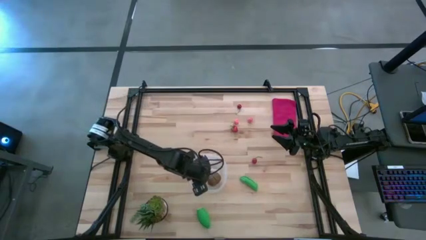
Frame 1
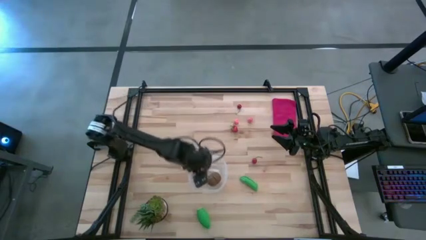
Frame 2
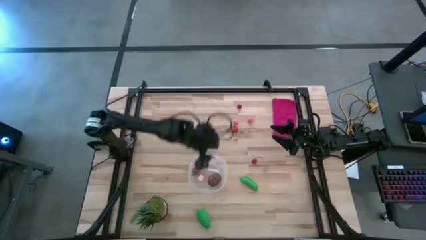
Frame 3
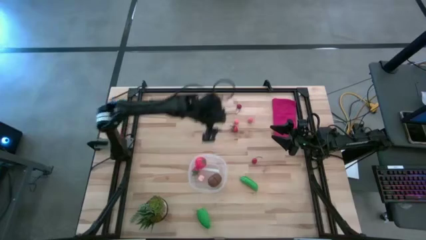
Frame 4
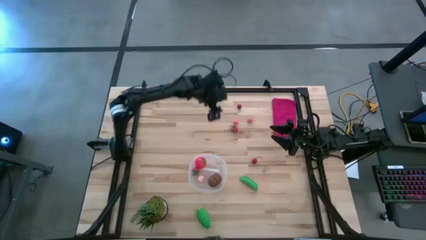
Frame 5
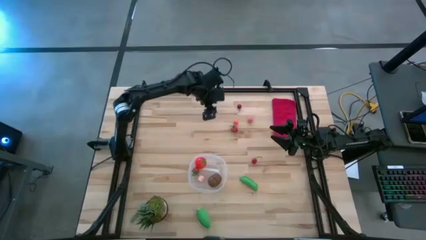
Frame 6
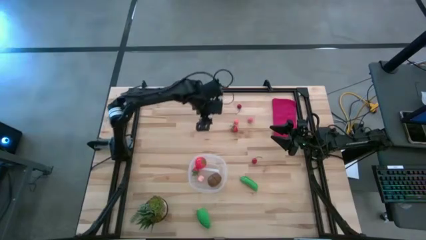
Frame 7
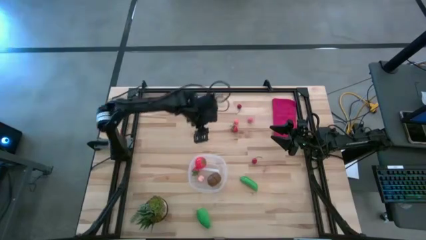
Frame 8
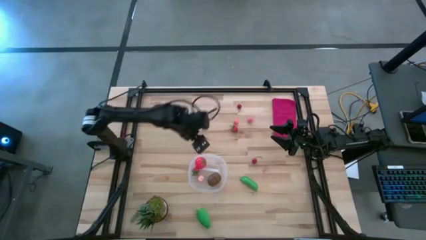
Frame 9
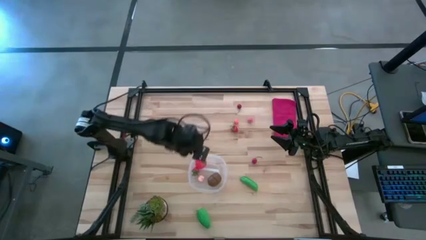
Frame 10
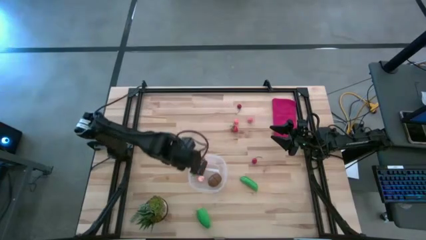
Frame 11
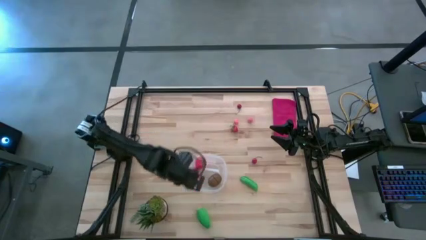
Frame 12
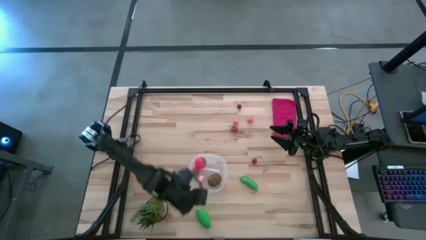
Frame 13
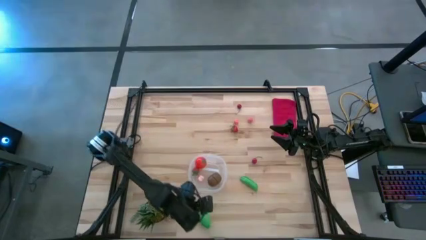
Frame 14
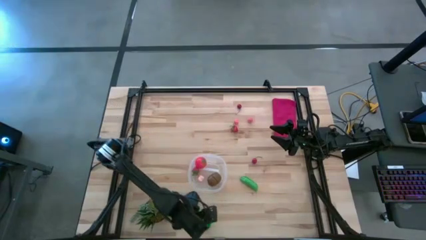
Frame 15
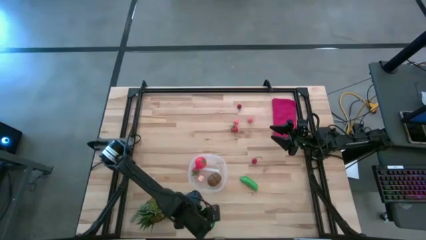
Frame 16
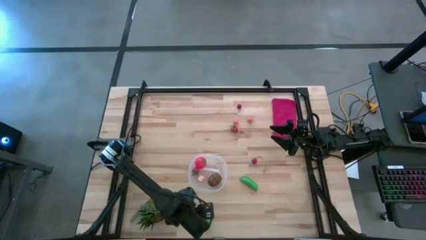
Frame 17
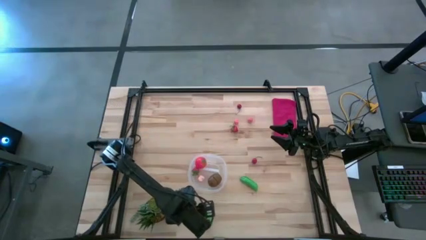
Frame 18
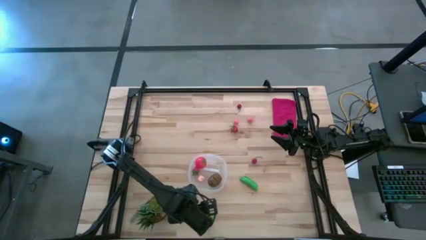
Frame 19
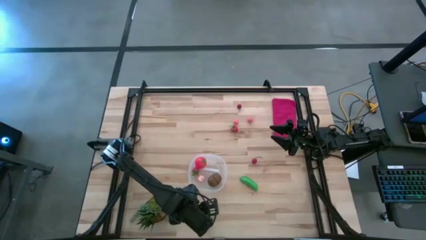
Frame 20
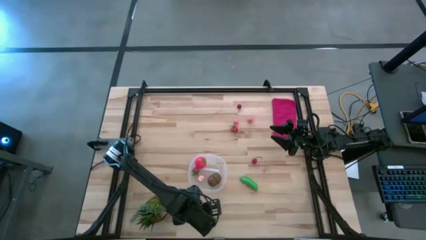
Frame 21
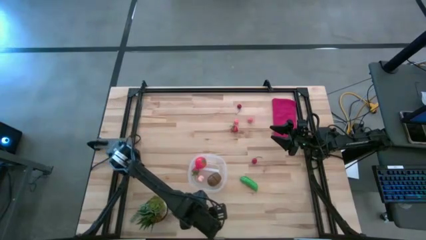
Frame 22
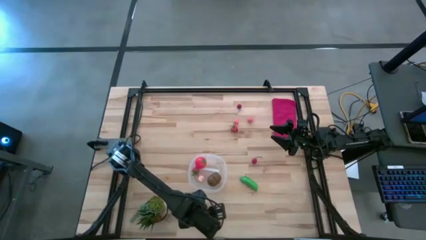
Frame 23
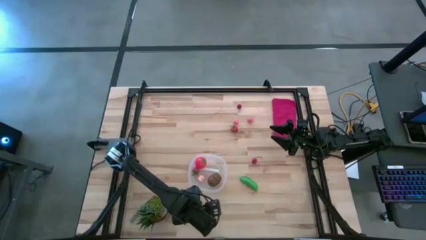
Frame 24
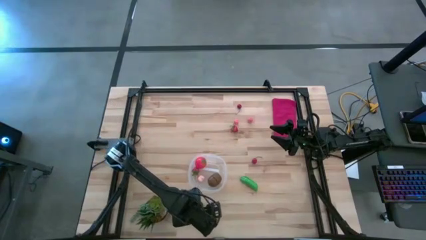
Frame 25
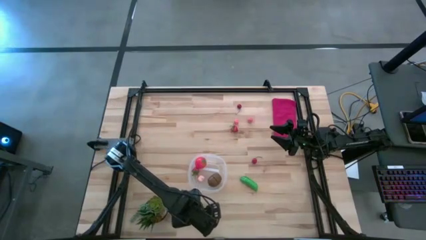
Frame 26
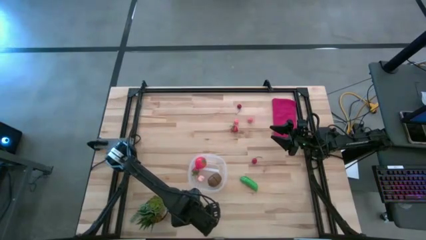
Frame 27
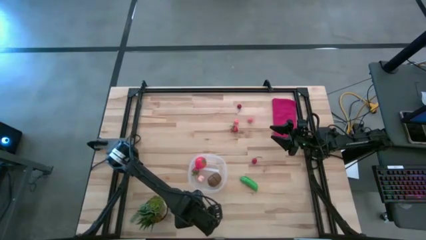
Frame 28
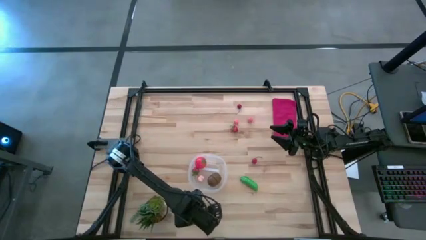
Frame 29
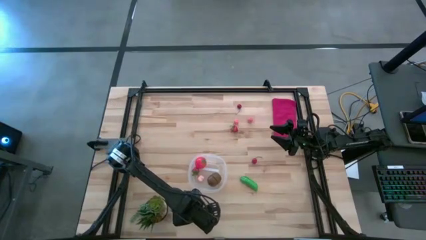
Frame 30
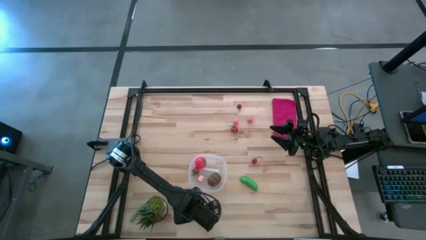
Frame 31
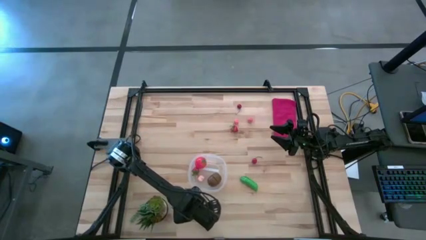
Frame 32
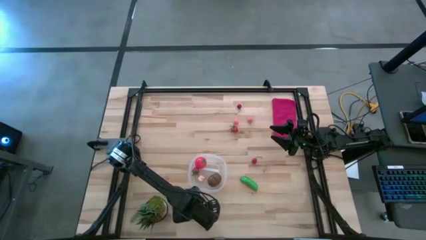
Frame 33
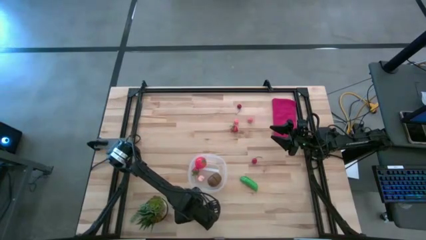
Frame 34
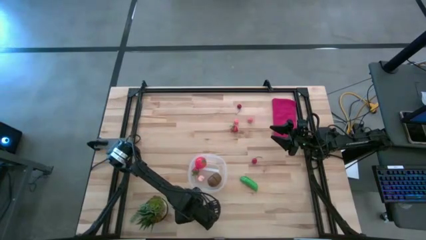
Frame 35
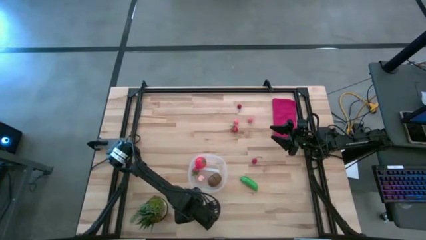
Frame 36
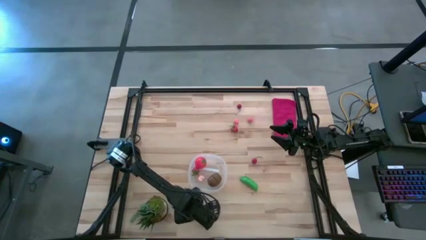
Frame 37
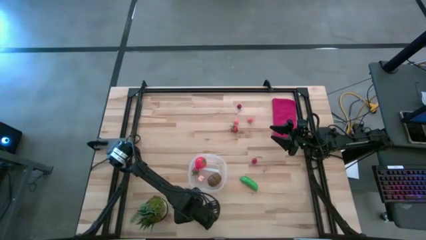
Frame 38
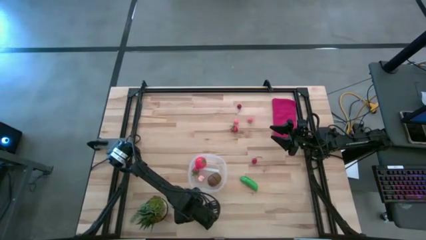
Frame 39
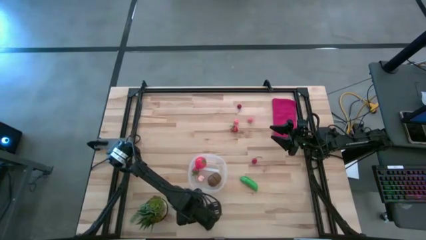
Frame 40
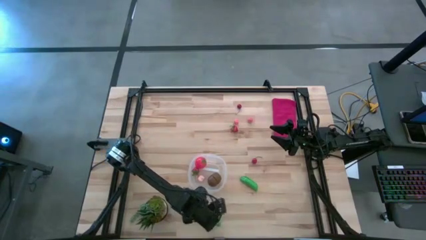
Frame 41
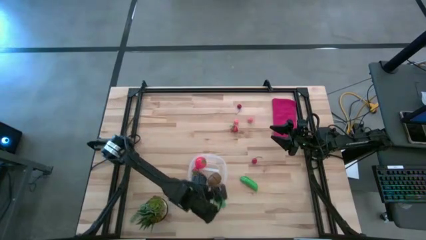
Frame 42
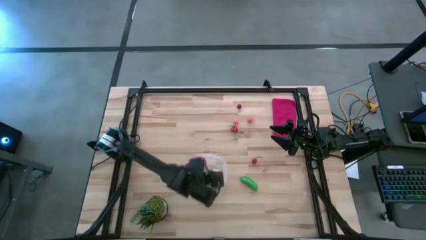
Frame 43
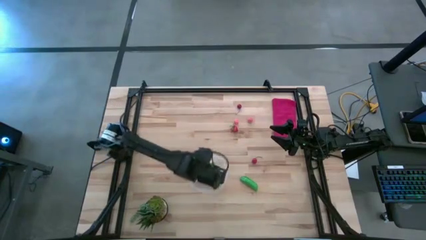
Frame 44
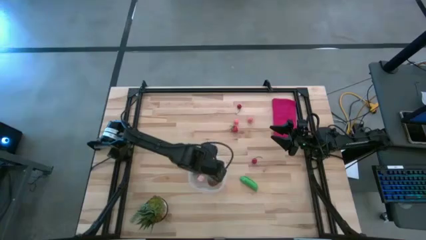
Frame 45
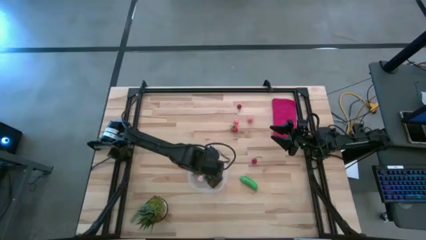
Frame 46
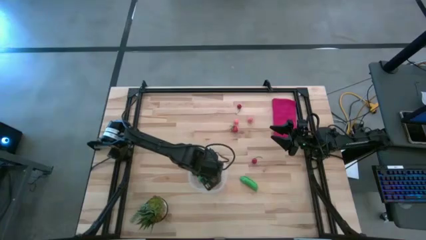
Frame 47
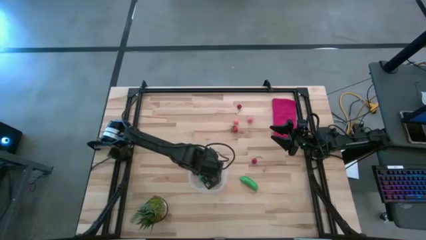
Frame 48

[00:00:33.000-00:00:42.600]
Task: Pick and placing Produce into tupperware
Put the corn into the bin

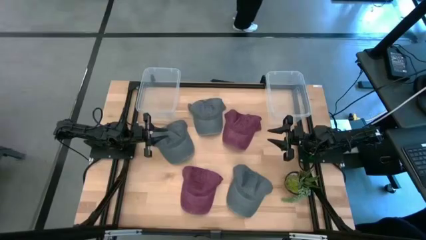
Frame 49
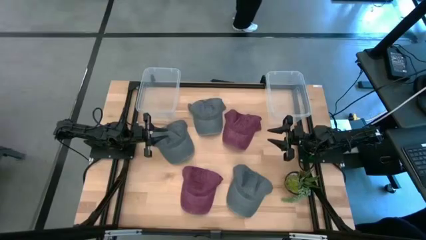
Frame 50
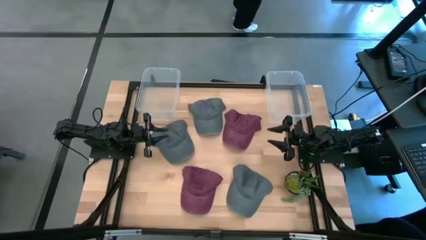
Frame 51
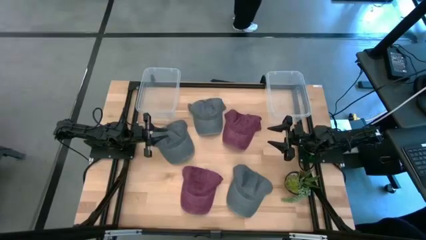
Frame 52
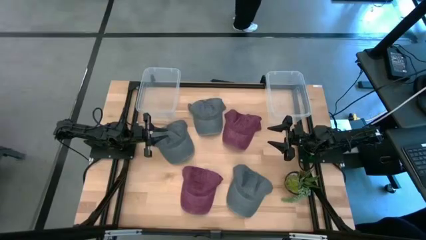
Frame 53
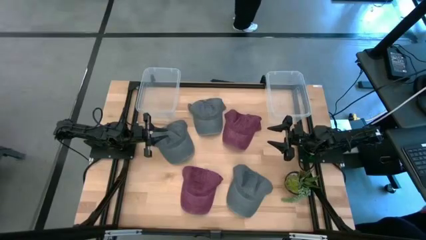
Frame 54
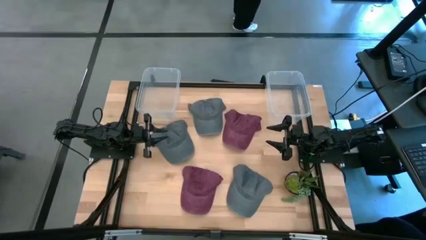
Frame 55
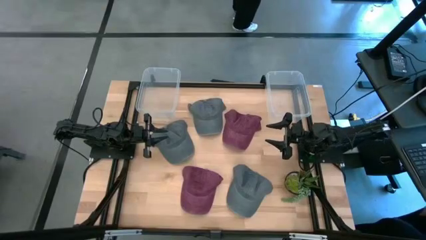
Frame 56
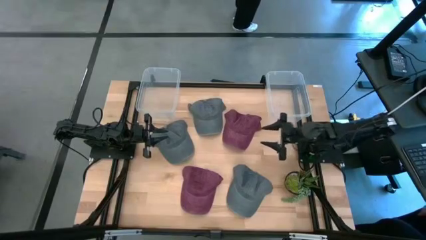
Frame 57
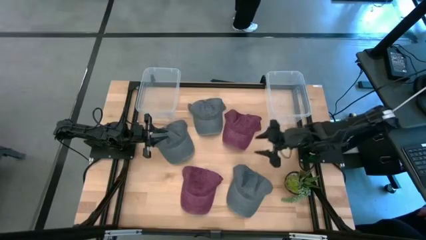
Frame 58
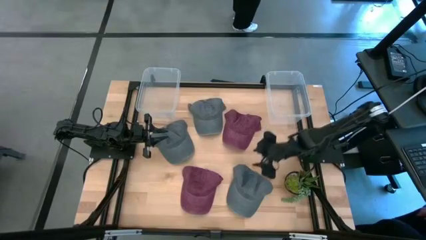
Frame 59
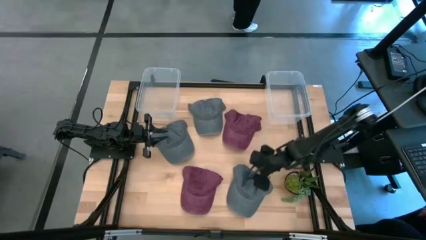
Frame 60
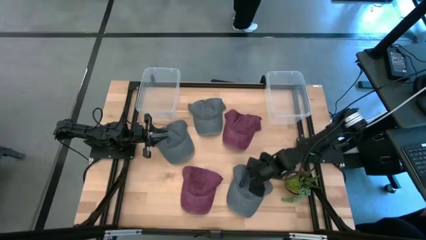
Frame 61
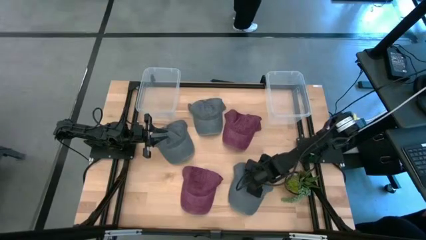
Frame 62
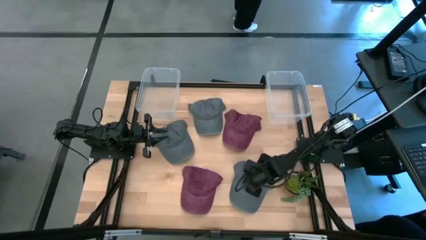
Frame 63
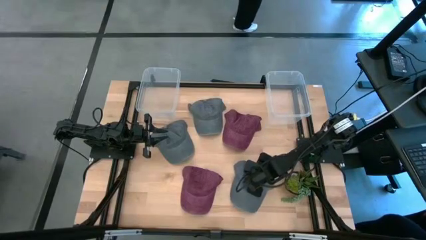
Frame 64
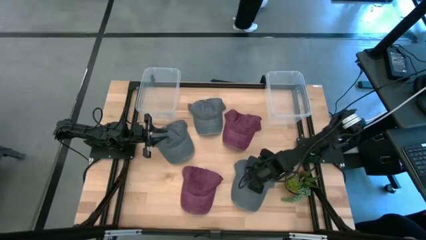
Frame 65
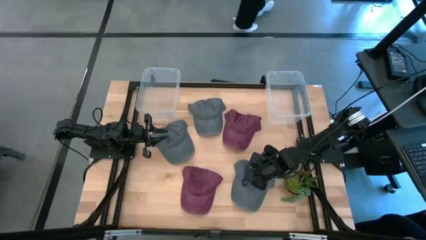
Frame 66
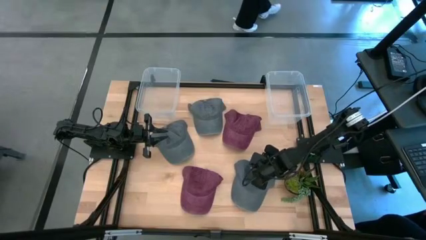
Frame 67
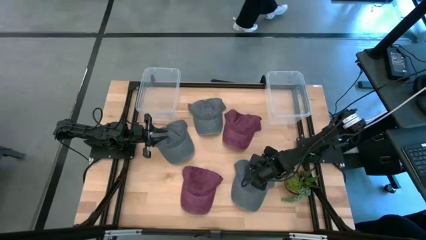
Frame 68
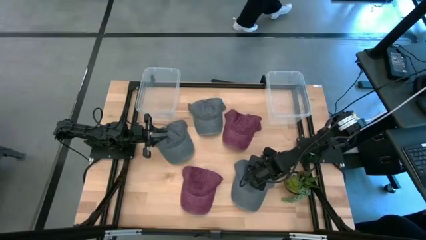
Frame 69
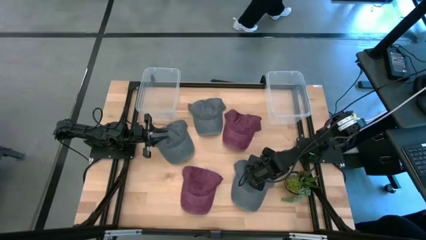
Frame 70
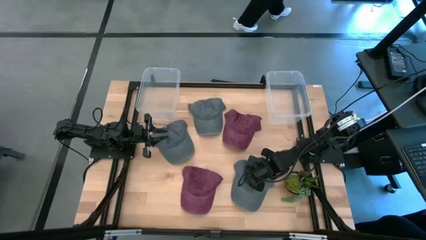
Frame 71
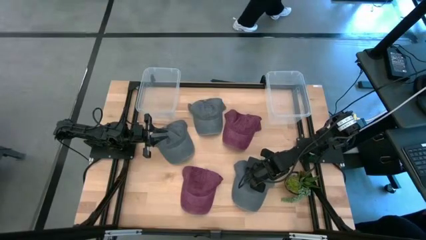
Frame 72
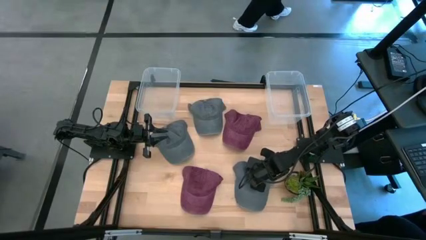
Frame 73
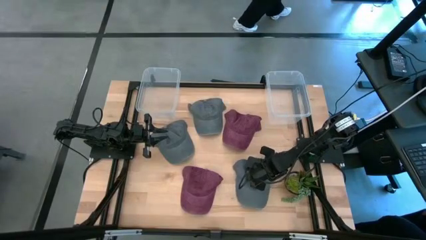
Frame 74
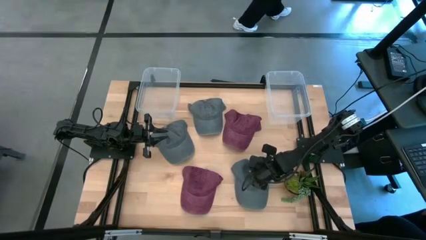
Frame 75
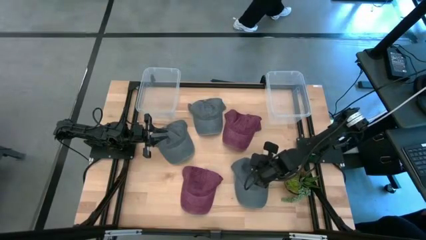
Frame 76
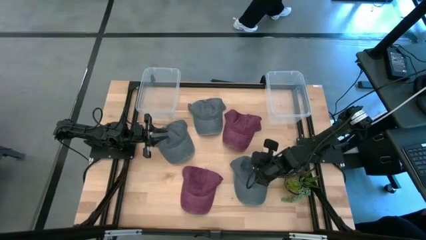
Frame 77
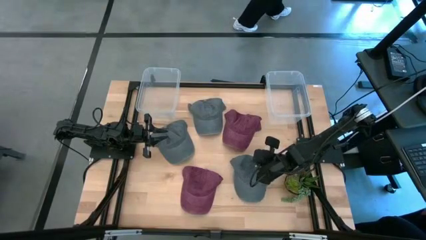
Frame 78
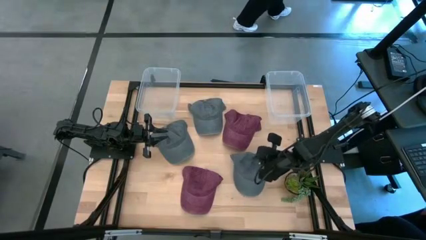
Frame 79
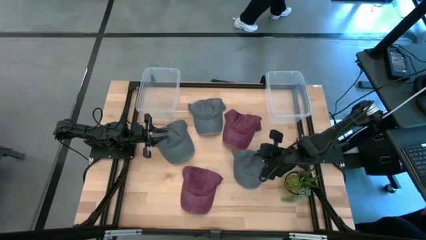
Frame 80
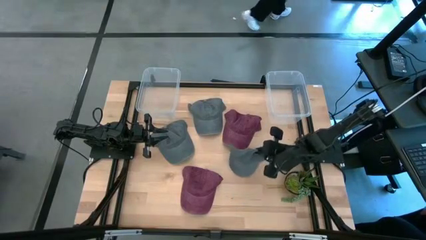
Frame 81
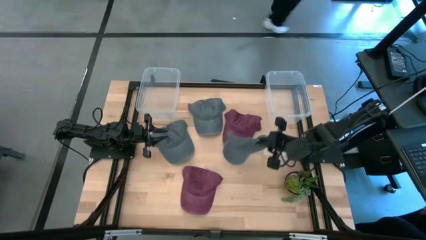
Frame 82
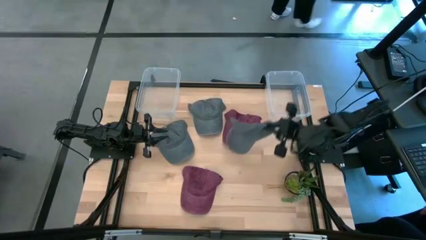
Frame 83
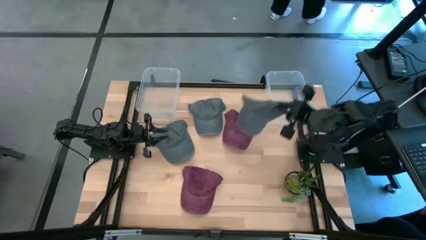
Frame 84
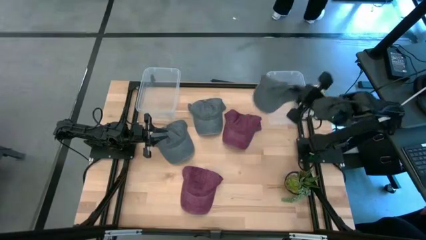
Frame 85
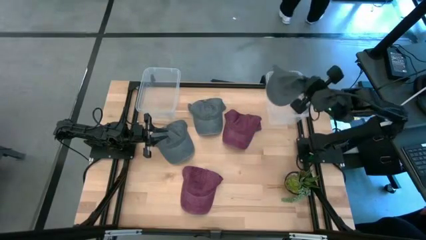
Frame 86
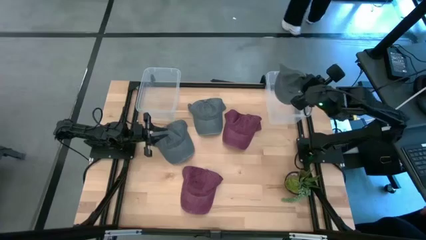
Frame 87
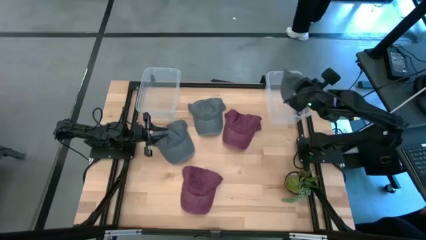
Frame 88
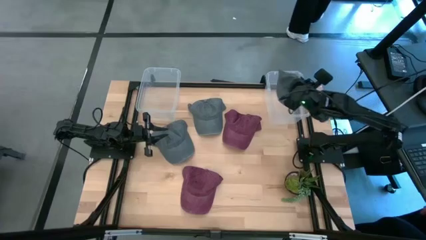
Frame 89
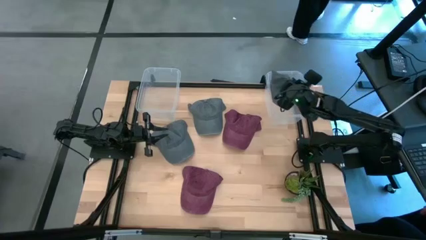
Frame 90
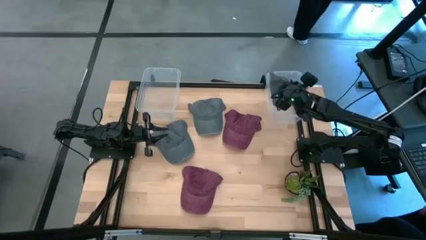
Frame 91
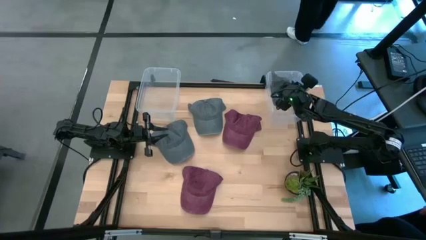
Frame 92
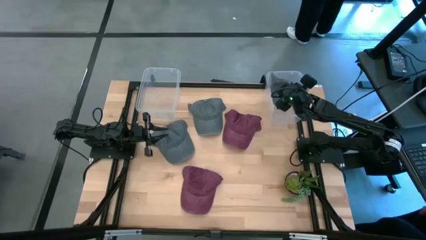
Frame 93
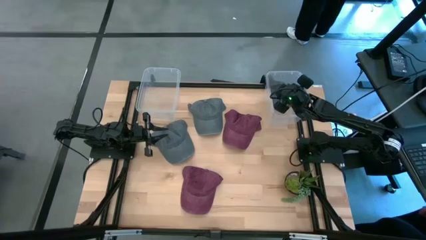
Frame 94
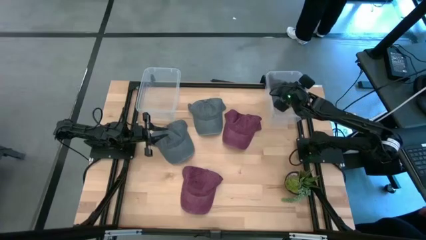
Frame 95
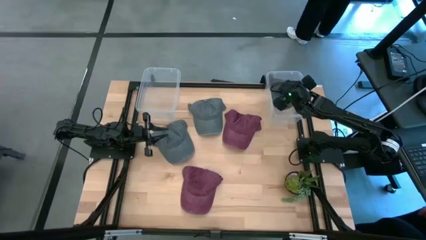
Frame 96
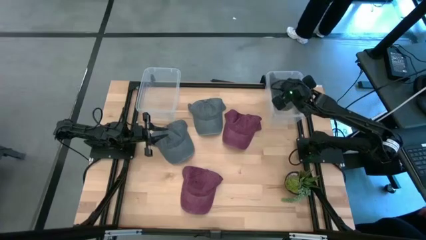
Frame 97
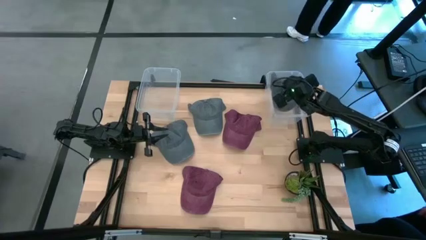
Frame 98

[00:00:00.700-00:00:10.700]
Task: Pick & Place hat
Put the bottom gray cap into the right transparent bin
